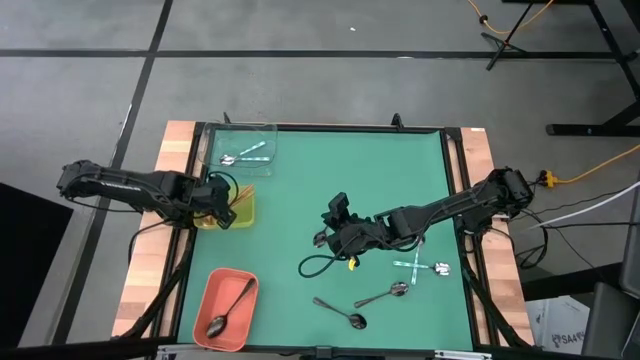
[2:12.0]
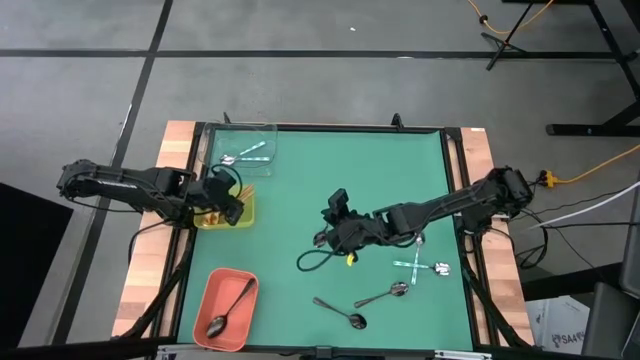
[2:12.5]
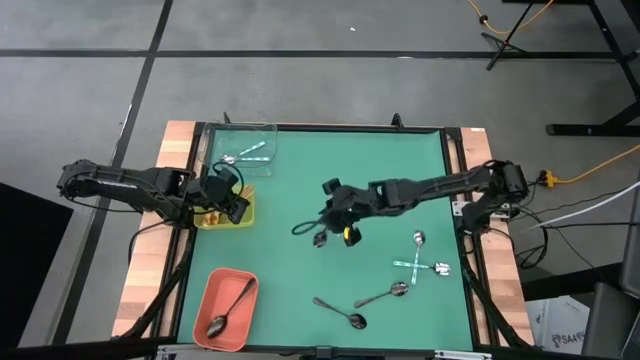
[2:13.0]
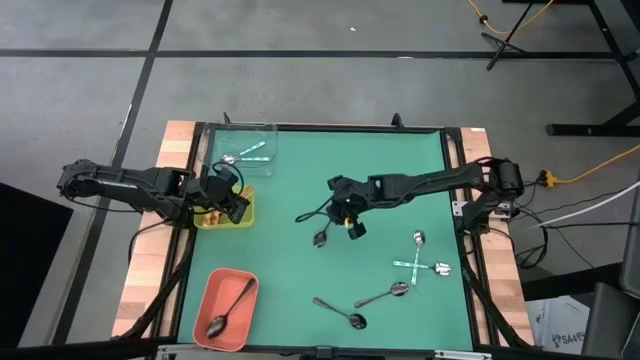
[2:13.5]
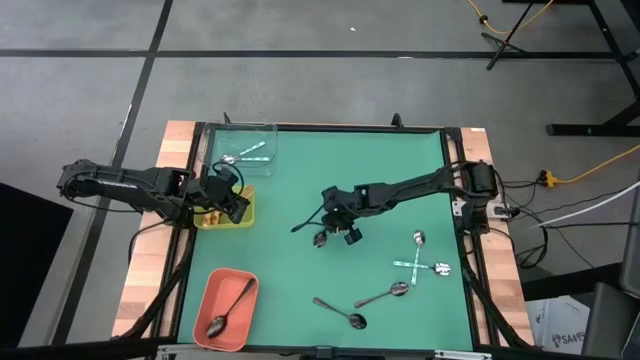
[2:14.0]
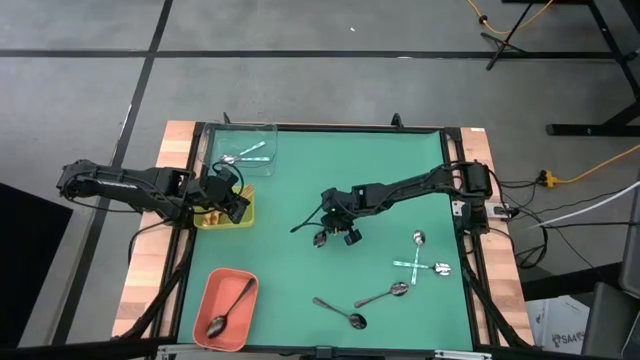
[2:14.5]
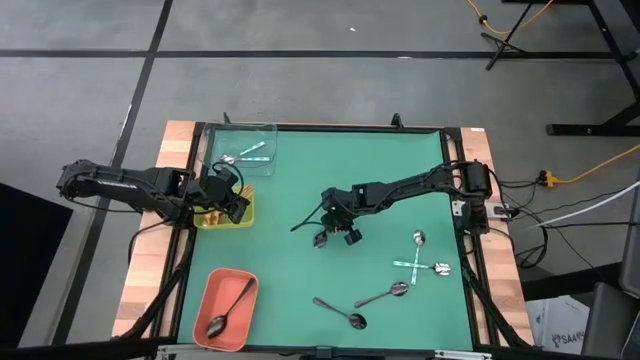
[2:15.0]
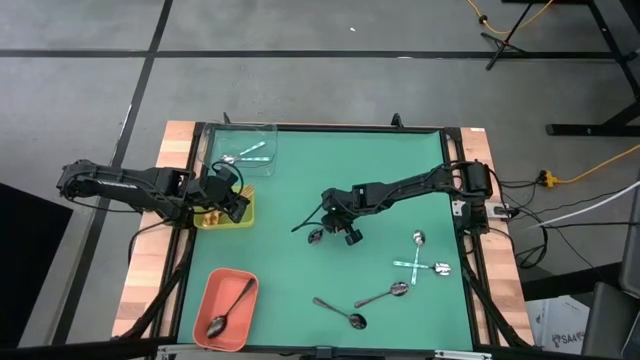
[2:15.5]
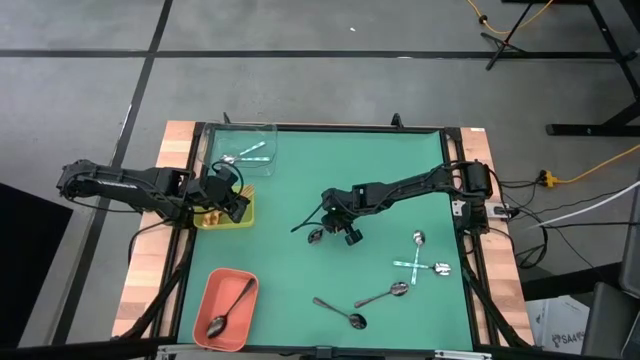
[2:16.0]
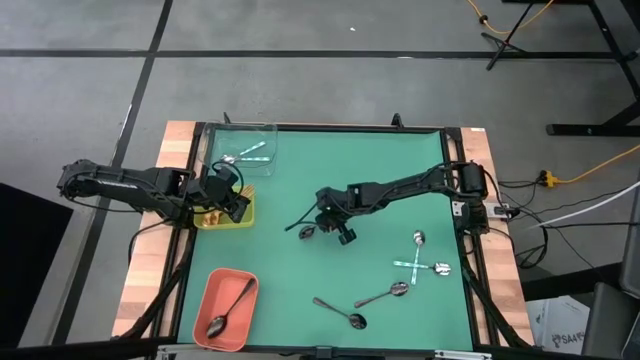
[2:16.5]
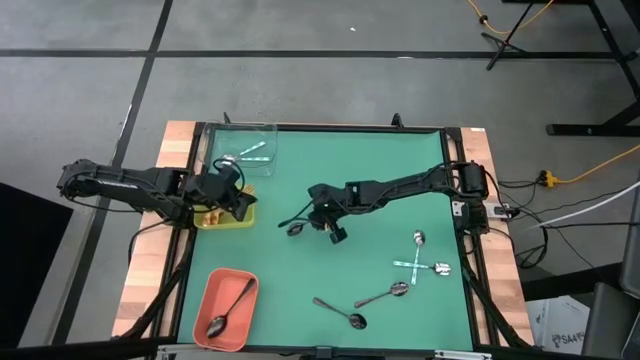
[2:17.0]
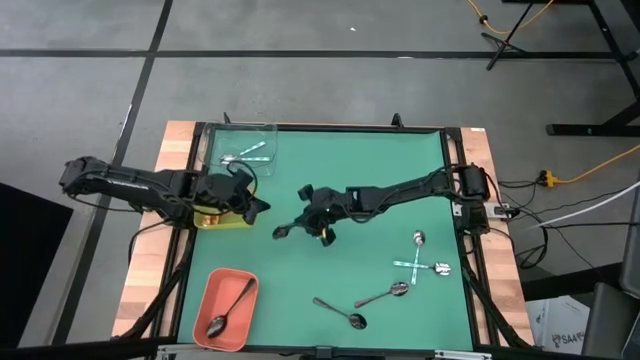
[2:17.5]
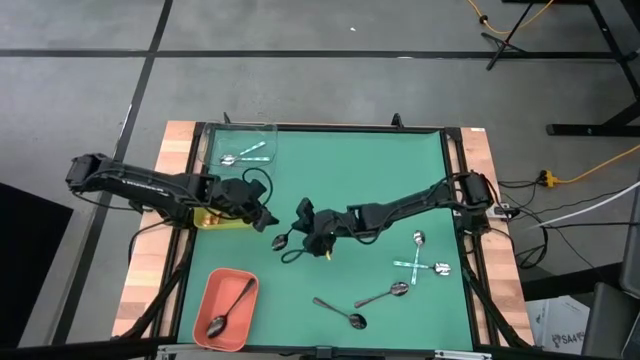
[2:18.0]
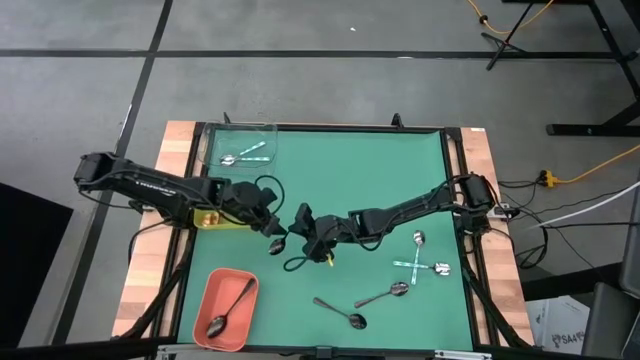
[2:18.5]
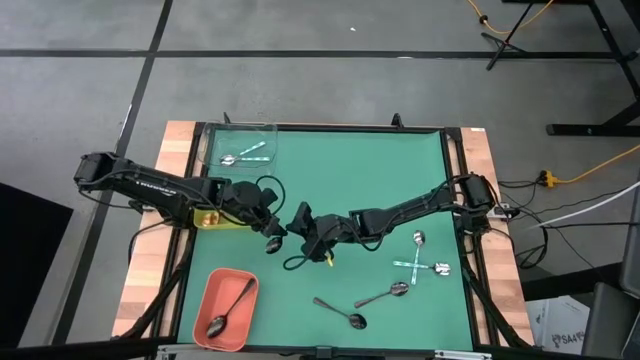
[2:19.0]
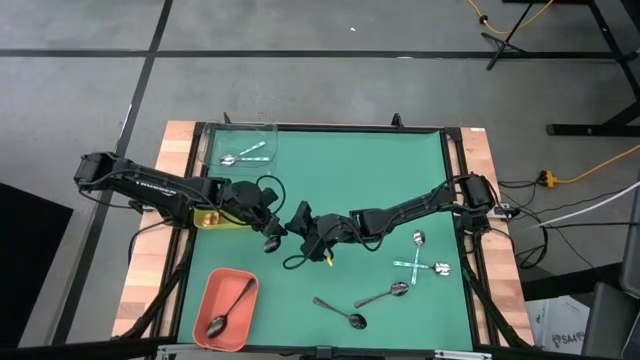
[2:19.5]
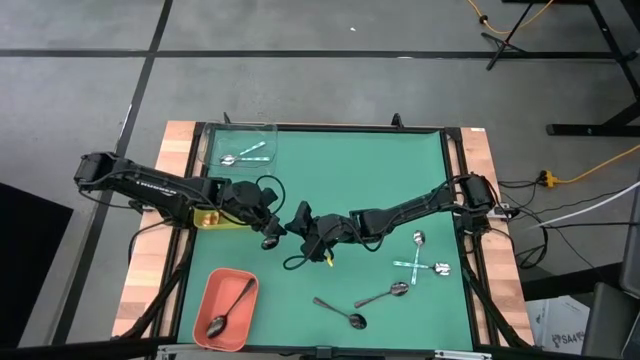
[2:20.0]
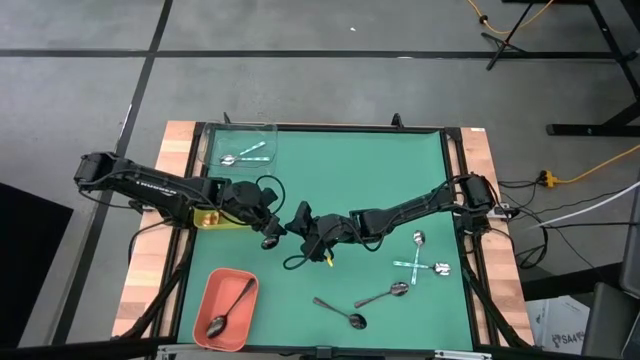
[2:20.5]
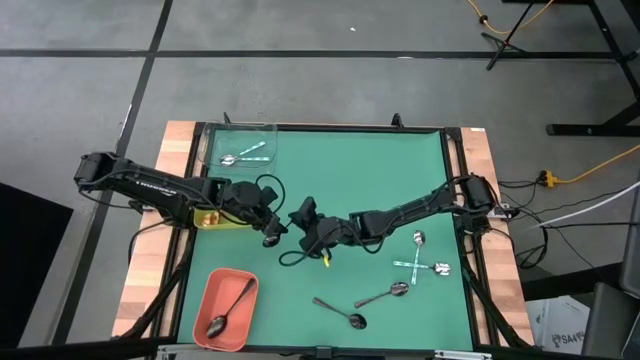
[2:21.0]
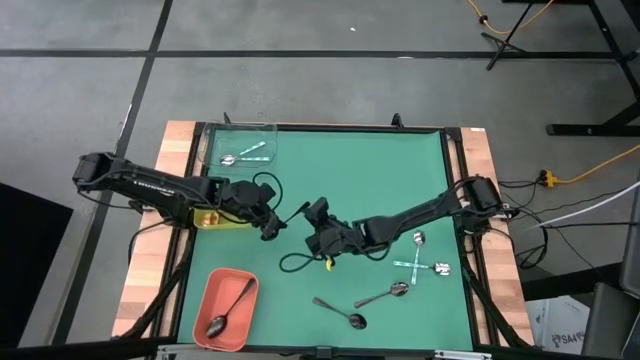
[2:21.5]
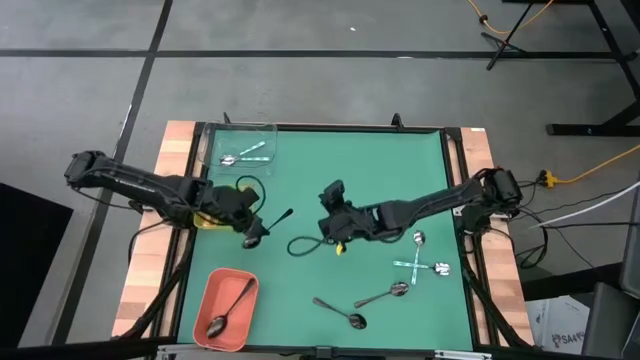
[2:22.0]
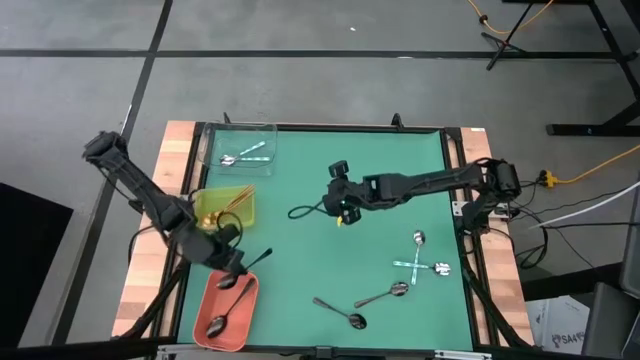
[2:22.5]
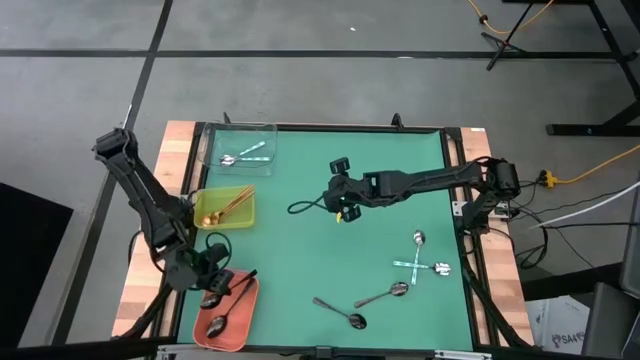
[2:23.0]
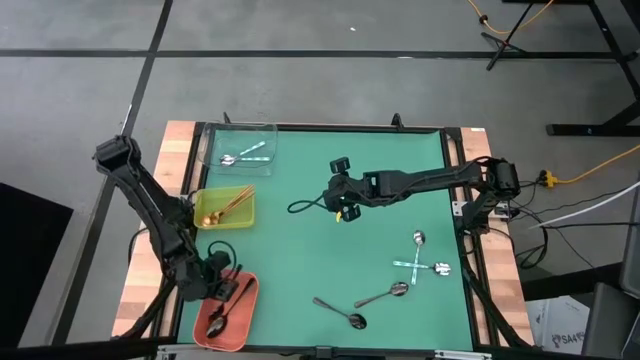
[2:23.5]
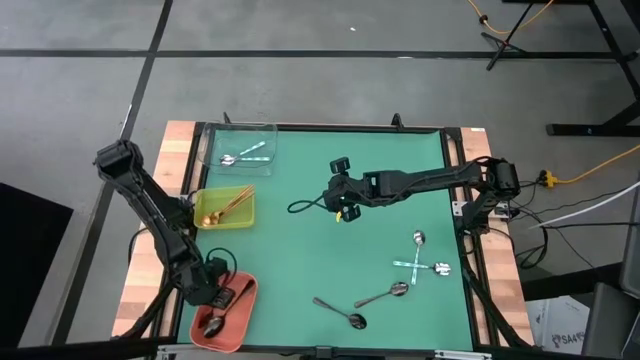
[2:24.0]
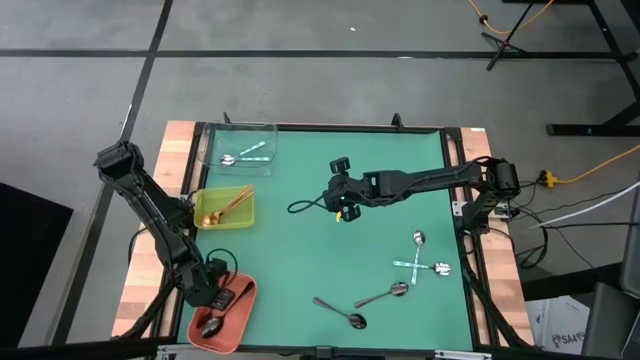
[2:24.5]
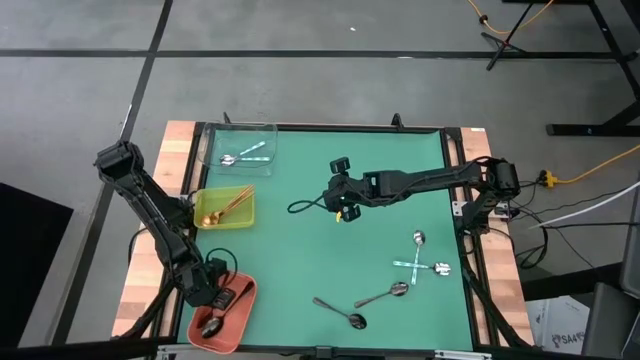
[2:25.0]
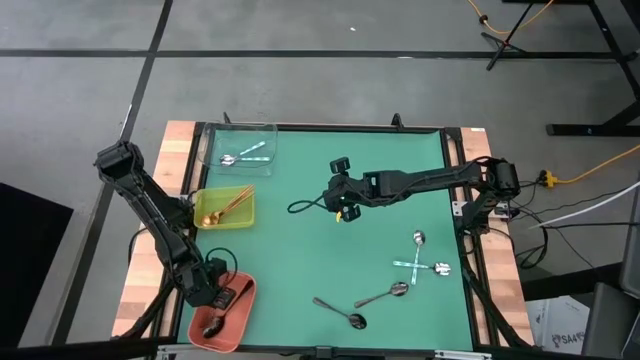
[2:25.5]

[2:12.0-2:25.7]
Task: Sort silverware by color (type)
Put the black spoon into the orange bin

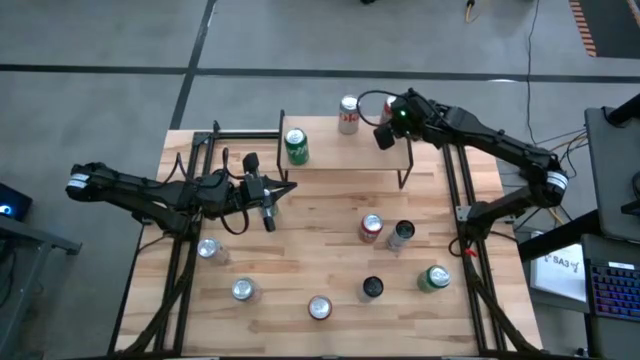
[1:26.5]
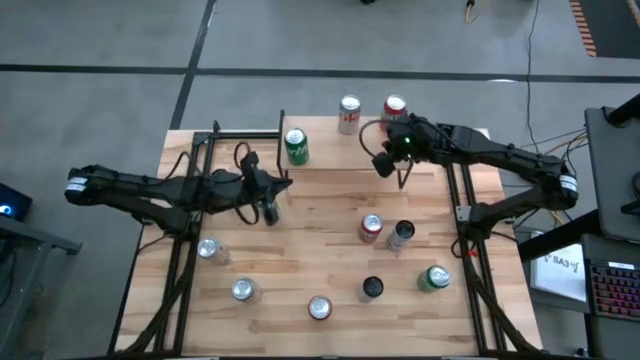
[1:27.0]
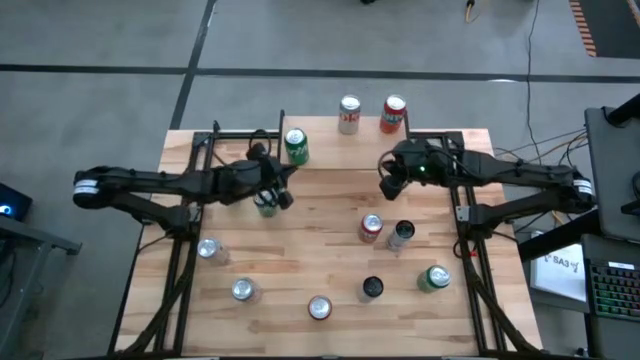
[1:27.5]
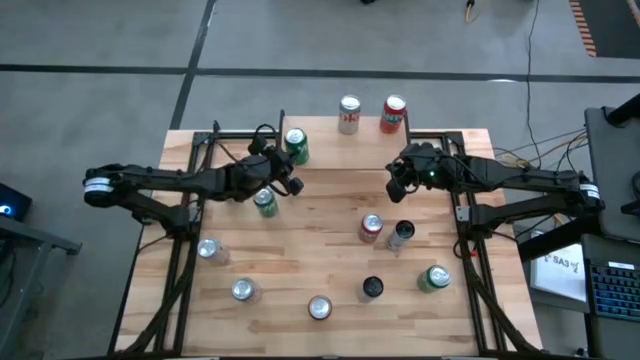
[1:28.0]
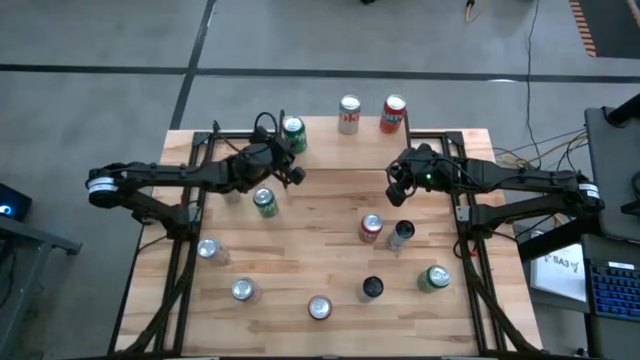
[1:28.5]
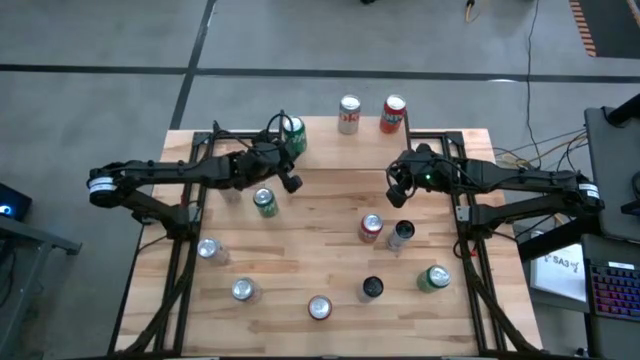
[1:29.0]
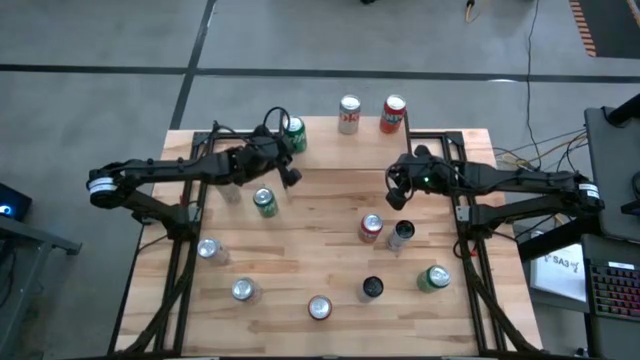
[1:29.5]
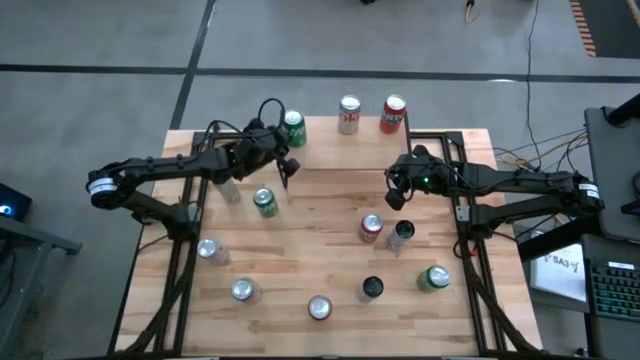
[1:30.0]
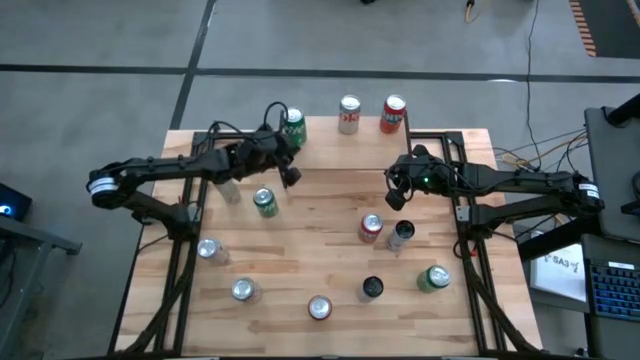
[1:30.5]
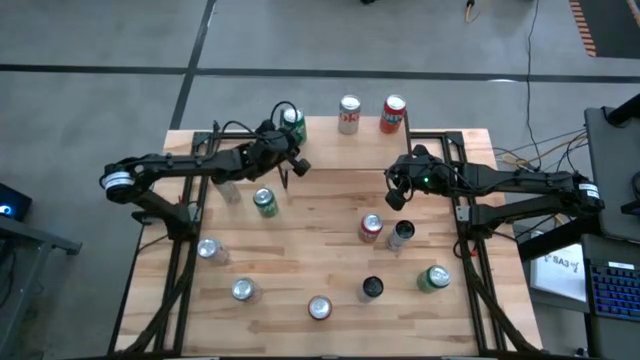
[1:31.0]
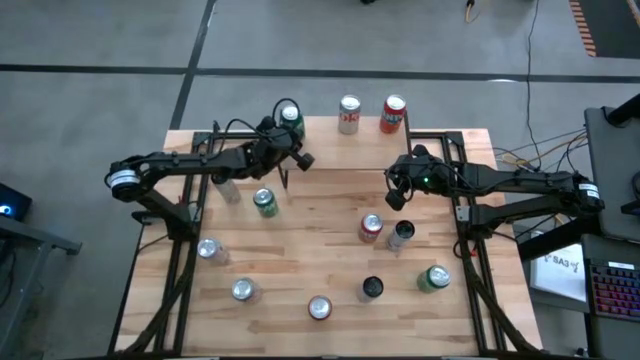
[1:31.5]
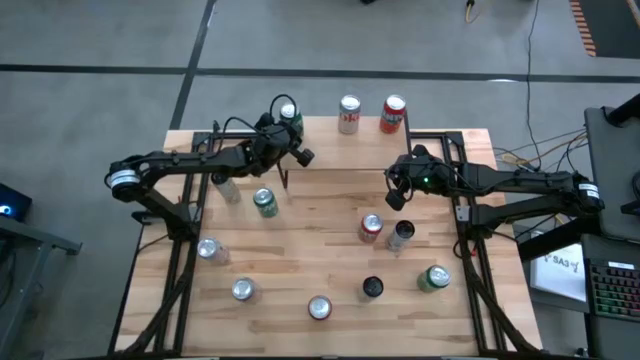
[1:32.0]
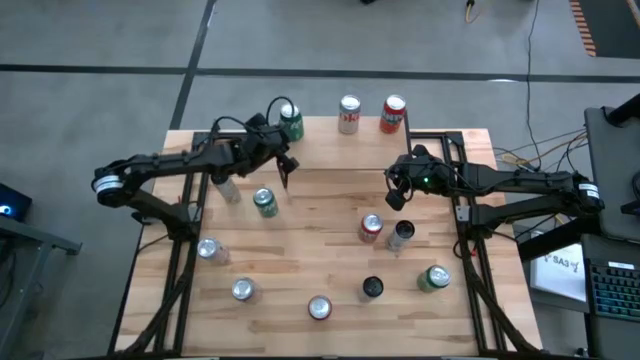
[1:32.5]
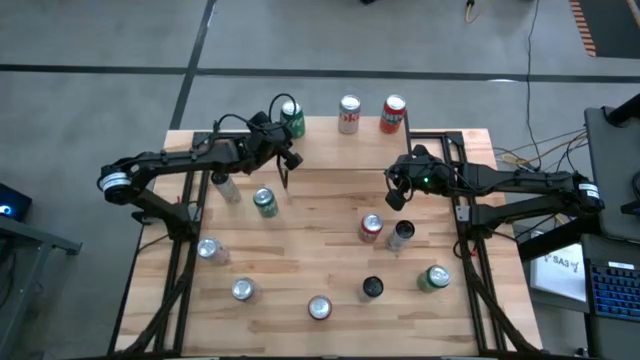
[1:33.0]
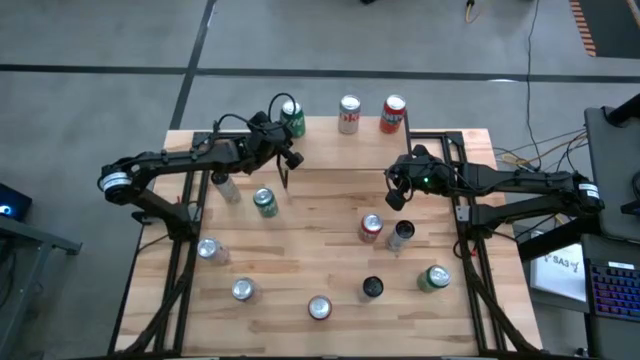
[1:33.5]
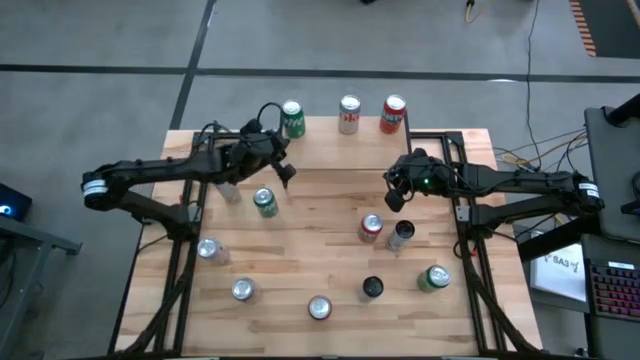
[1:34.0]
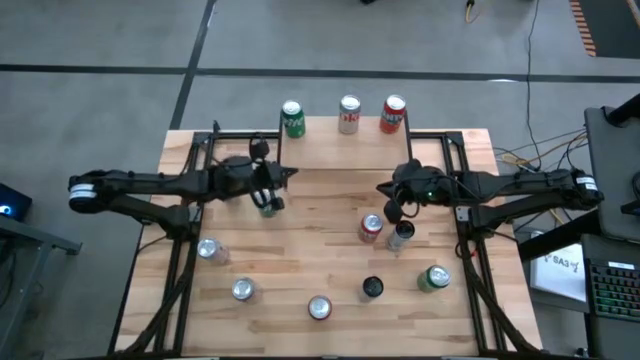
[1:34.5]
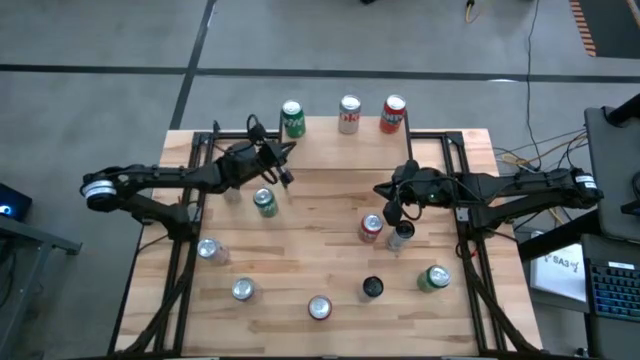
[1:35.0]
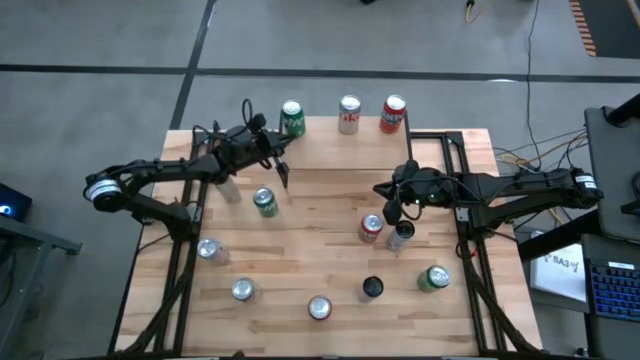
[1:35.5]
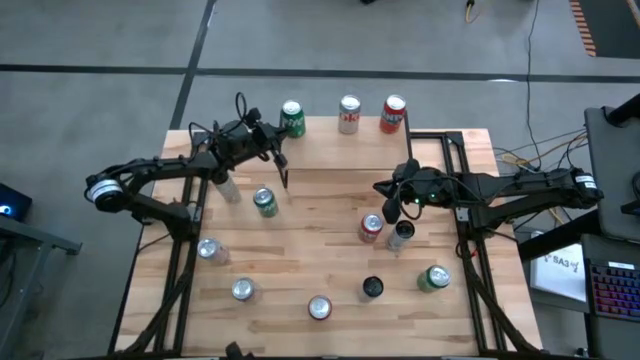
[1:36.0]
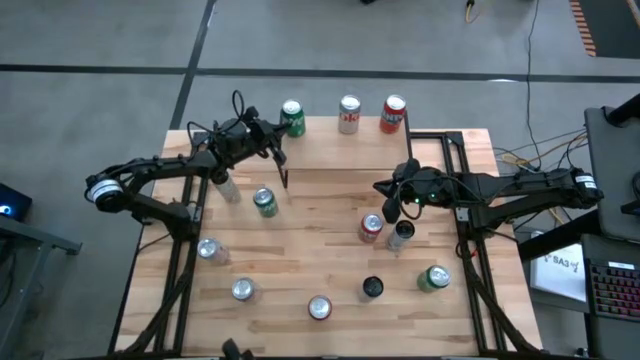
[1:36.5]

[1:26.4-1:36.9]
Task: Place canned beverage on shelf
Adjust the green soda can on the shelf
